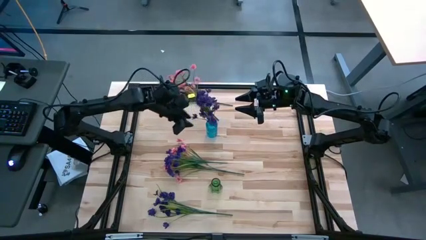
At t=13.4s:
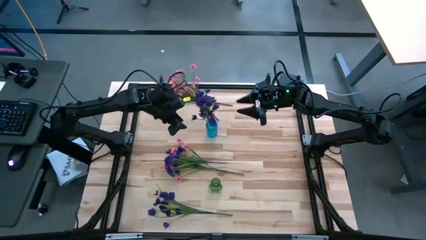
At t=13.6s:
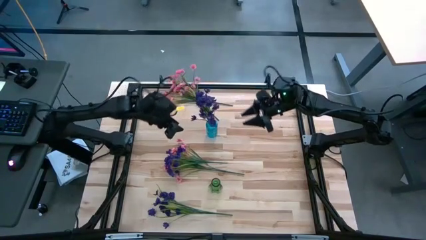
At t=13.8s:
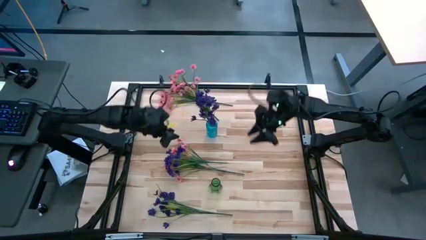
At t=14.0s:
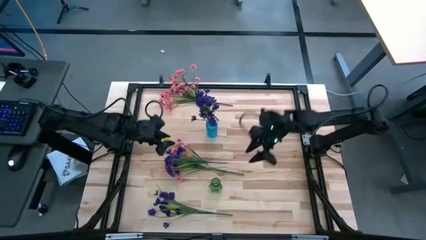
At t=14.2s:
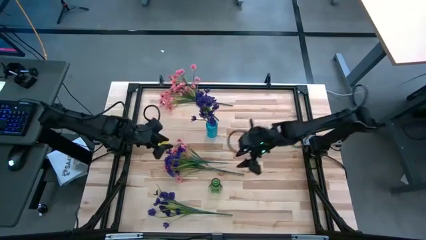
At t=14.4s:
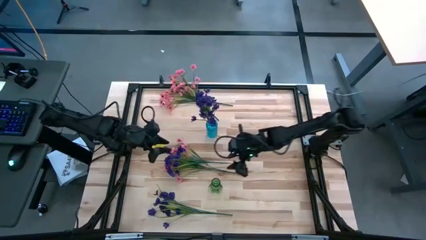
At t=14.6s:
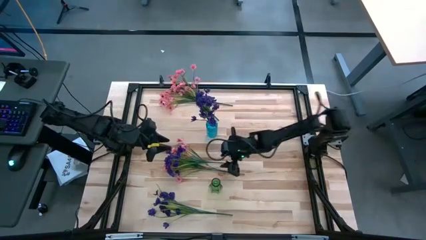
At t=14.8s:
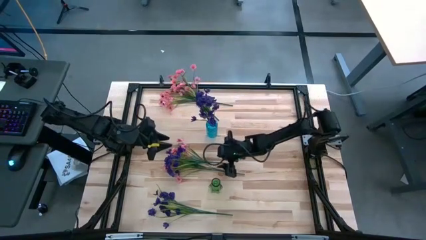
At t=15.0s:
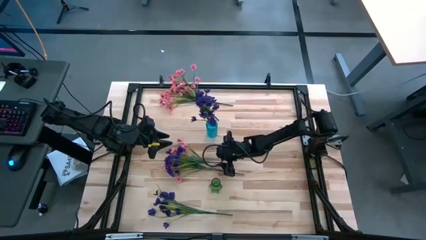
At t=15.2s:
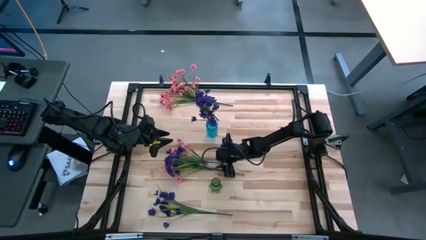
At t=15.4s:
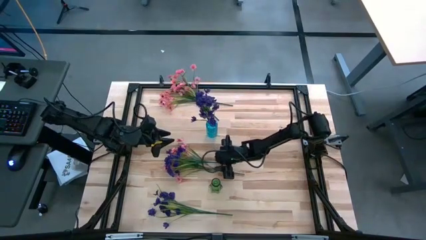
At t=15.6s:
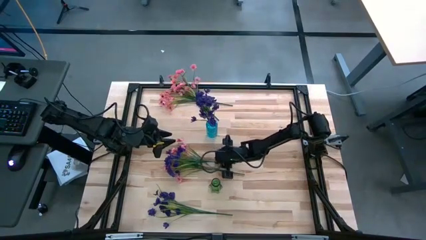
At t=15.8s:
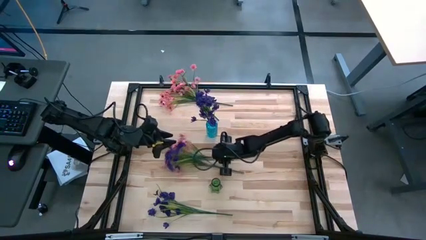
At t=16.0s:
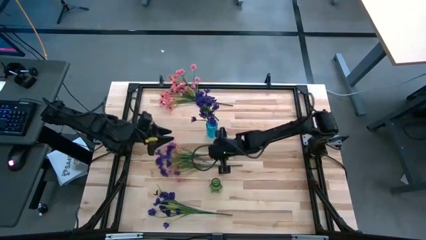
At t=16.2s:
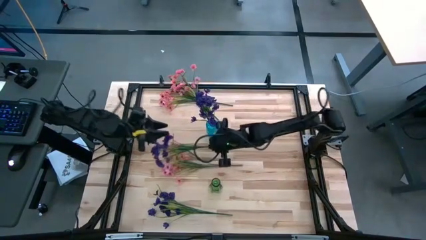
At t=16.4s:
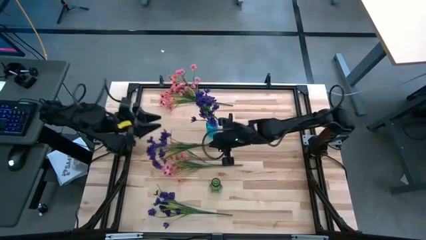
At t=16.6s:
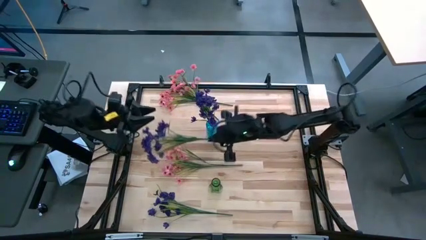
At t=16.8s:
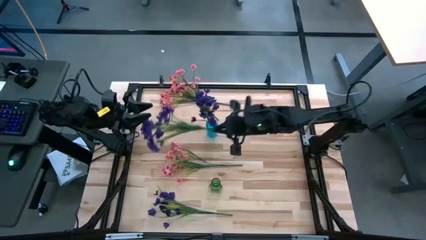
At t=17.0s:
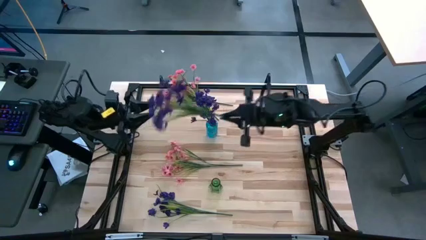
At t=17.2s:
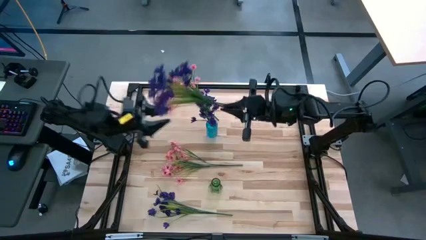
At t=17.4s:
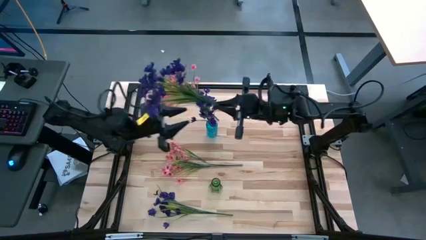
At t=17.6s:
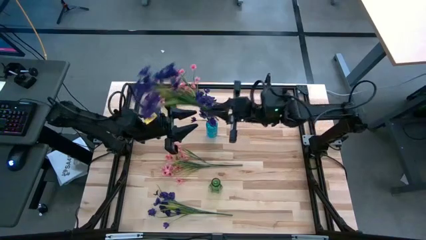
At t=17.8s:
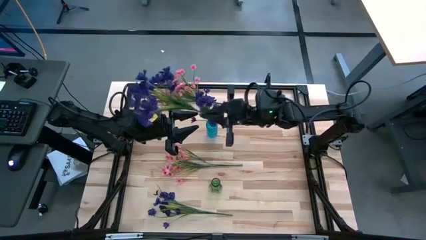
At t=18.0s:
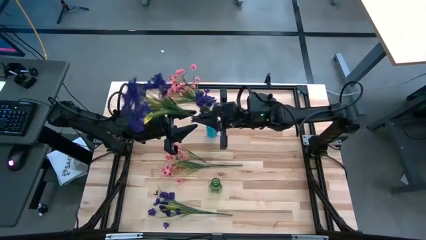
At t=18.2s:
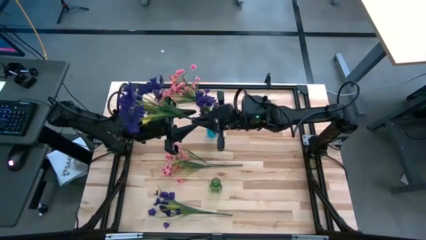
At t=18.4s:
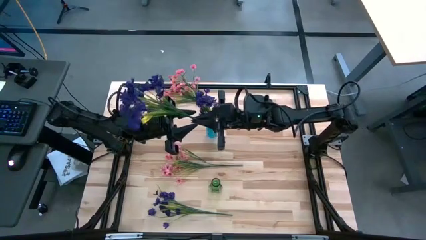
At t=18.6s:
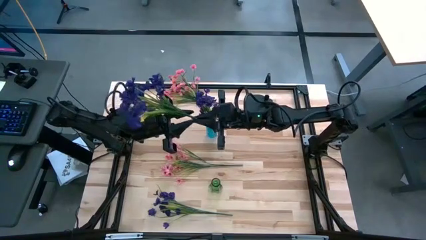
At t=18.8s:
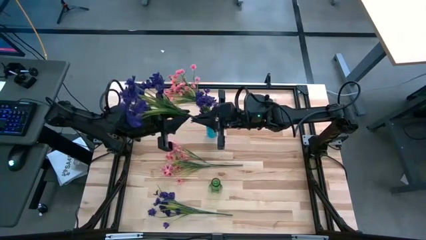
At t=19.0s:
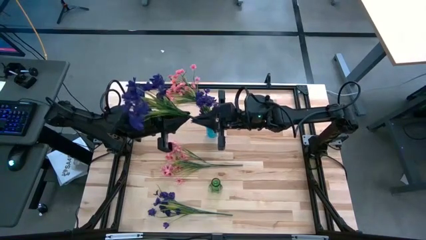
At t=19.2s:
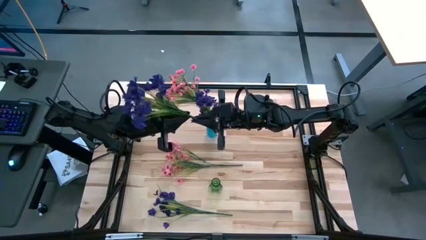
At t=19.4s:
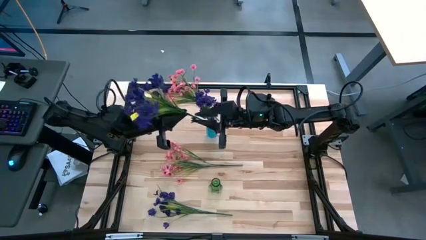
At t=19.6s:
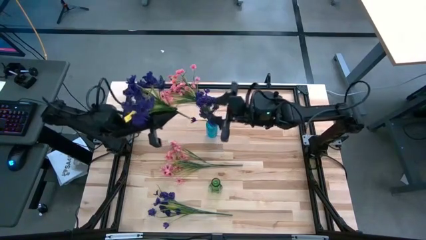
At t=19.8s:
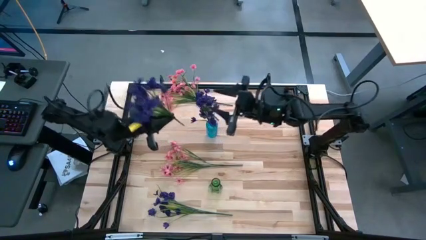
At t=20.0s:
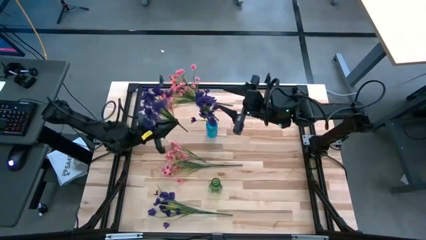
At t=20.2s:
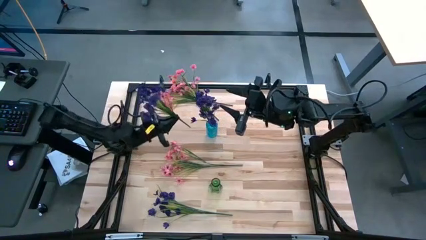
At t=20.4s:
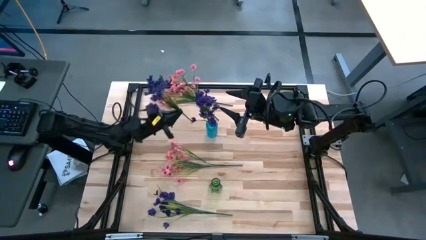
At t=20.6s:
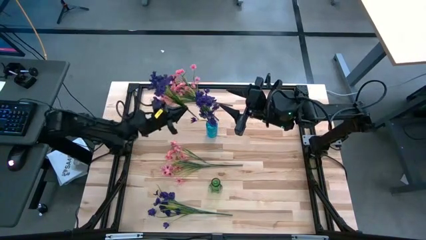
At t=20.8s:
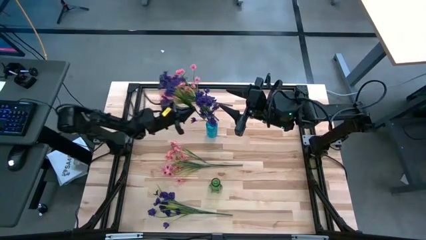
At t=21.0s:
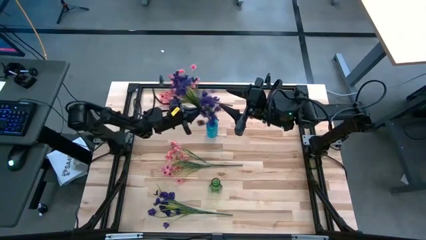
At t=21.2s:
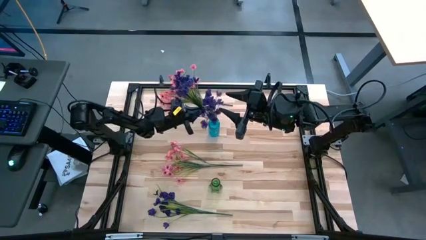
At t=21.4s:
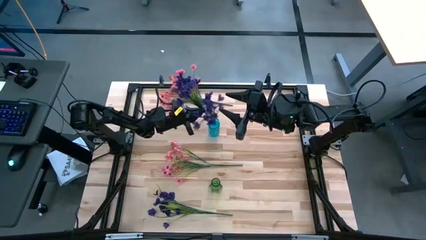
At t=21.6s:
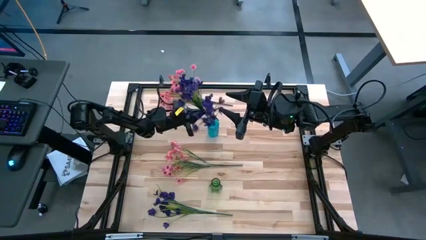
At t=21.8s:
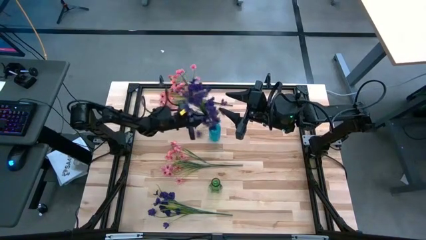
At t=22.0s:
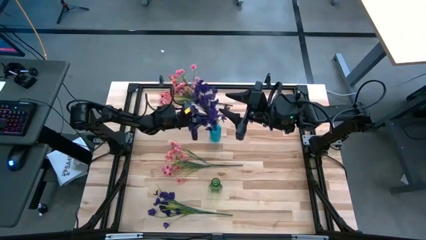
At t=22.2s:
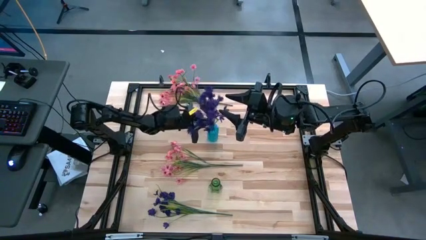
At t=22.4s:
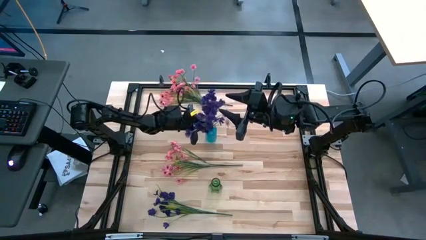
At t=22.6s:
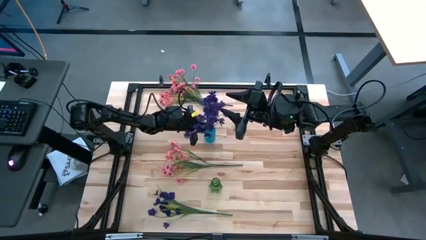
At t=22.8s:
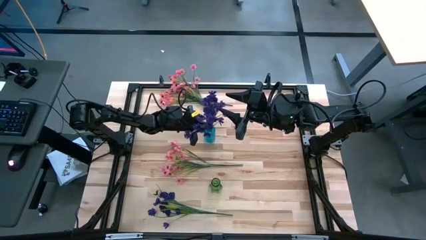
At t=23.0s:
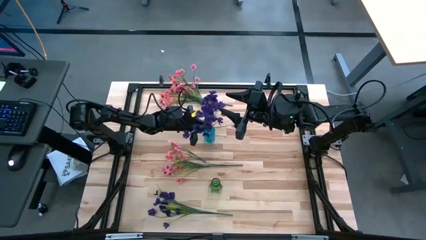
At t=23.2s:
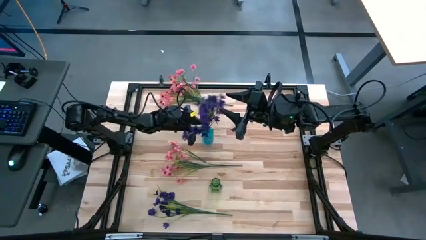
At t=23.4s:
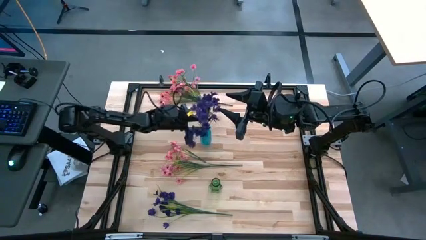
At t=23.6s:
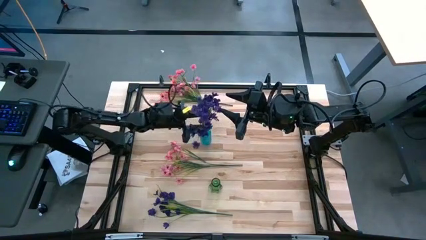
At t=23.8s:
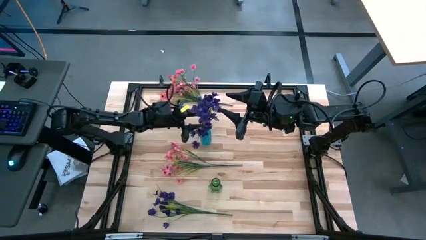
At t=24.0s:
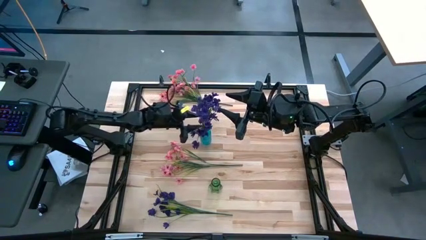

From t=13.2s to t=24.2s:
Task: Sort flowers into vase by color
Put the top violet flowers into the blue crystal vase
